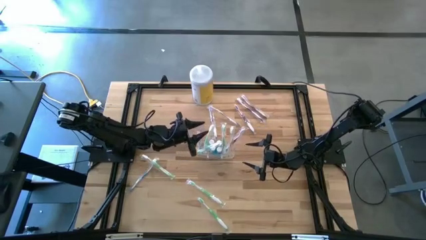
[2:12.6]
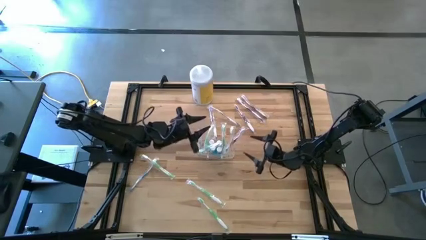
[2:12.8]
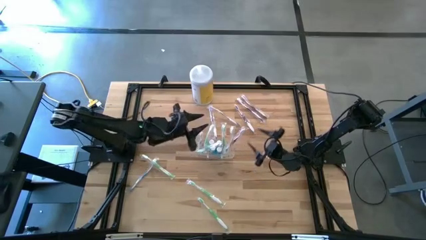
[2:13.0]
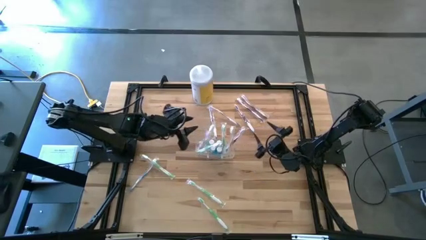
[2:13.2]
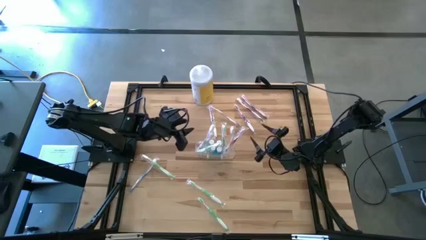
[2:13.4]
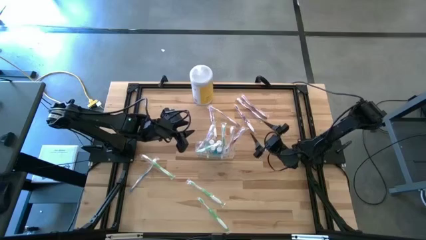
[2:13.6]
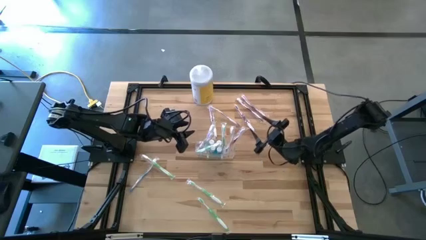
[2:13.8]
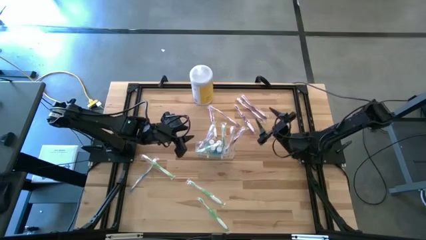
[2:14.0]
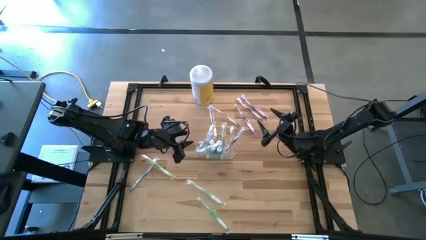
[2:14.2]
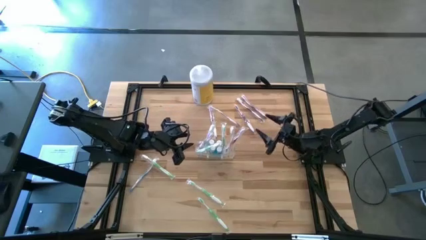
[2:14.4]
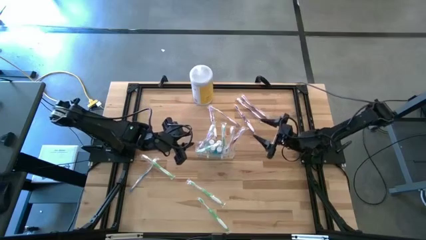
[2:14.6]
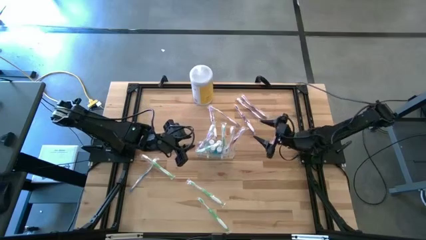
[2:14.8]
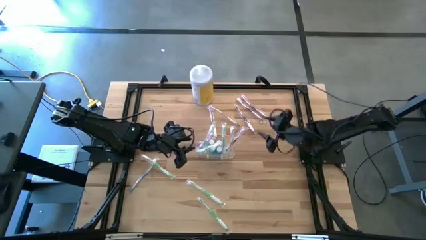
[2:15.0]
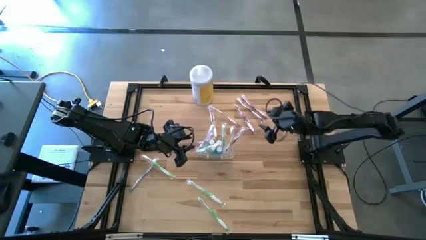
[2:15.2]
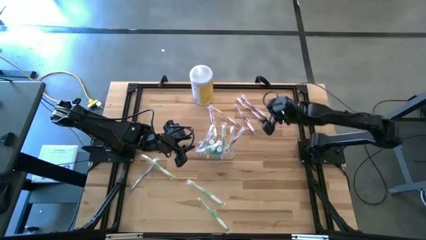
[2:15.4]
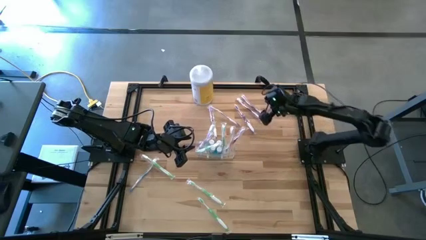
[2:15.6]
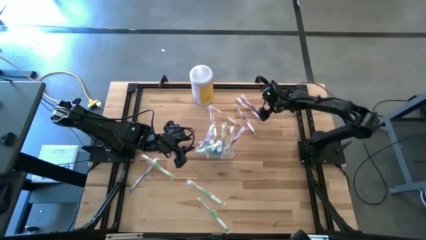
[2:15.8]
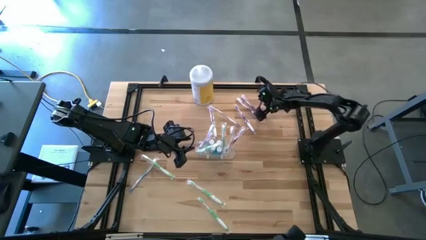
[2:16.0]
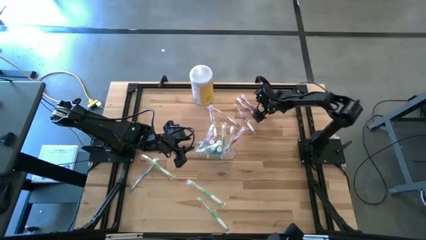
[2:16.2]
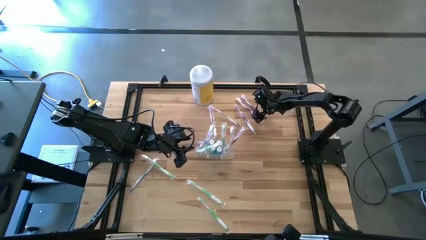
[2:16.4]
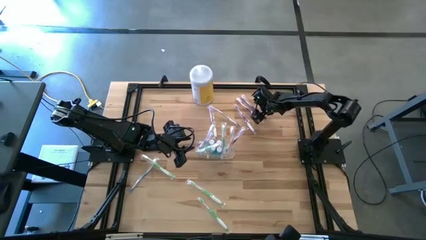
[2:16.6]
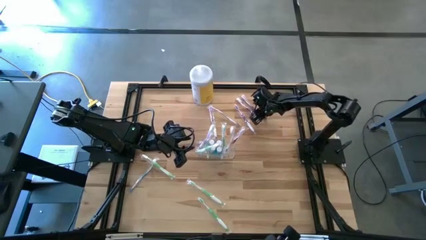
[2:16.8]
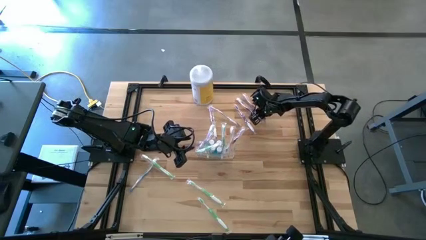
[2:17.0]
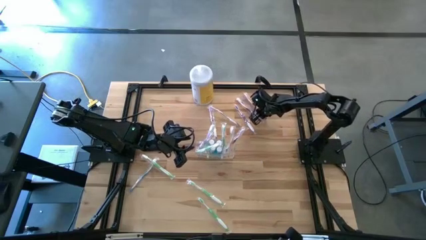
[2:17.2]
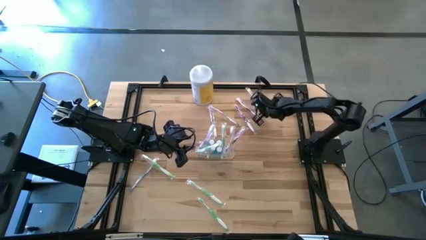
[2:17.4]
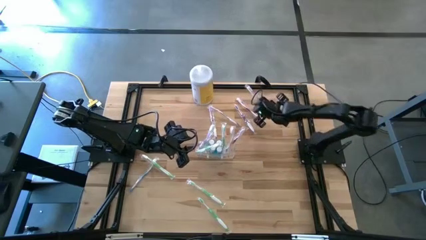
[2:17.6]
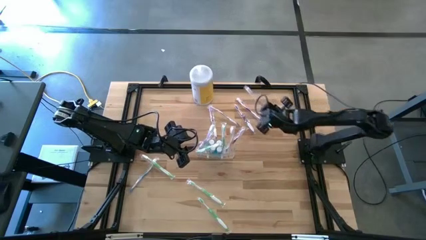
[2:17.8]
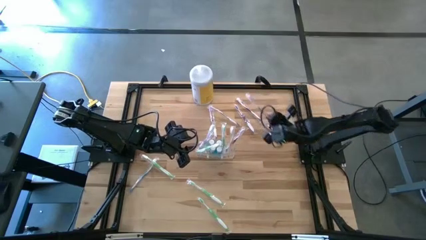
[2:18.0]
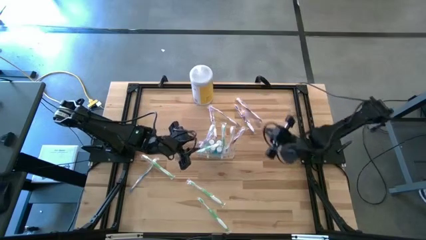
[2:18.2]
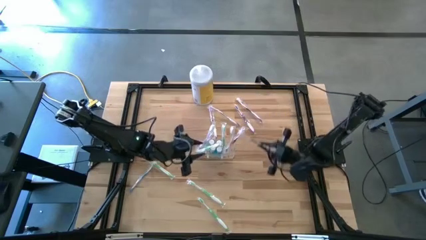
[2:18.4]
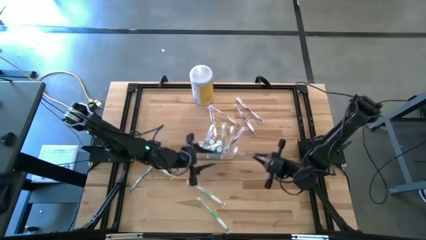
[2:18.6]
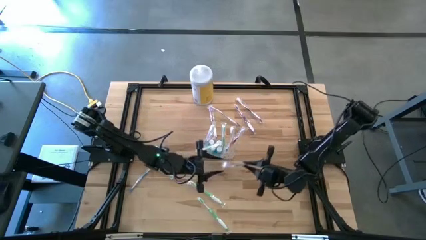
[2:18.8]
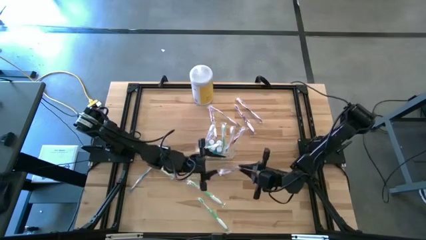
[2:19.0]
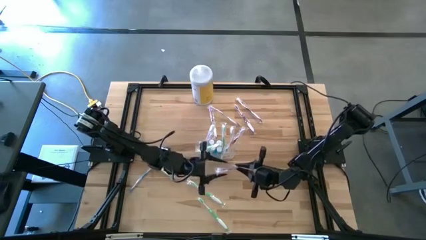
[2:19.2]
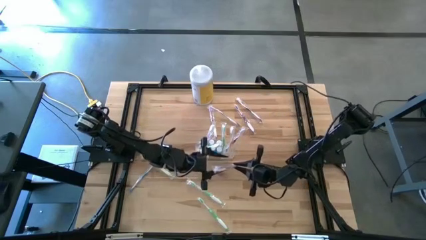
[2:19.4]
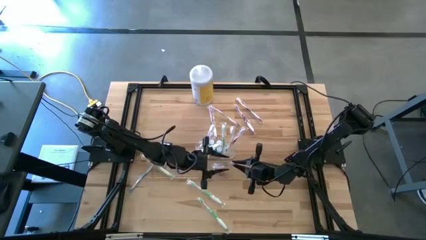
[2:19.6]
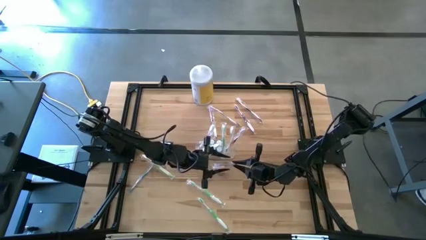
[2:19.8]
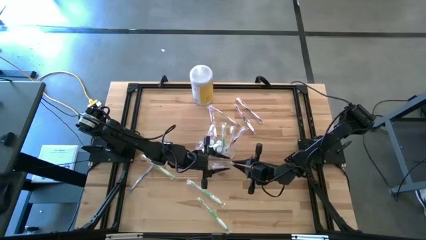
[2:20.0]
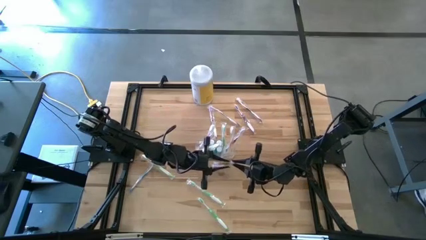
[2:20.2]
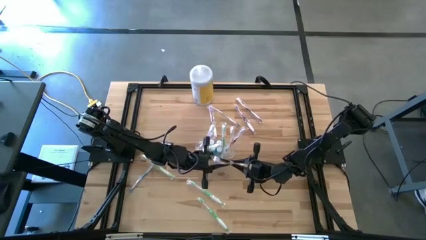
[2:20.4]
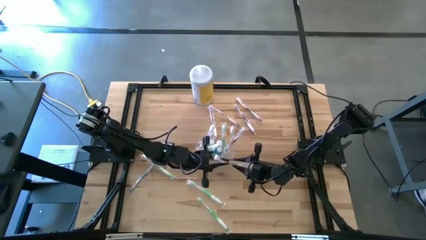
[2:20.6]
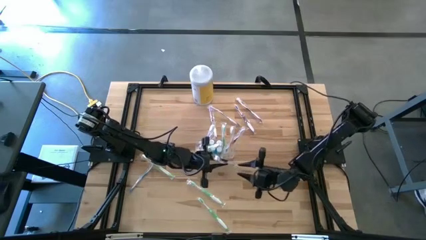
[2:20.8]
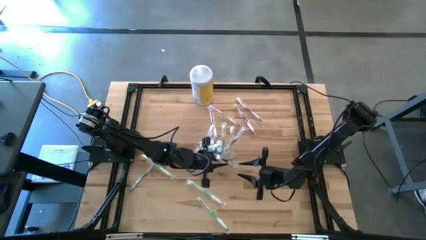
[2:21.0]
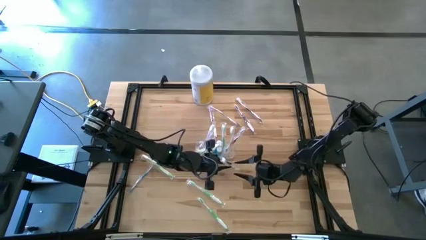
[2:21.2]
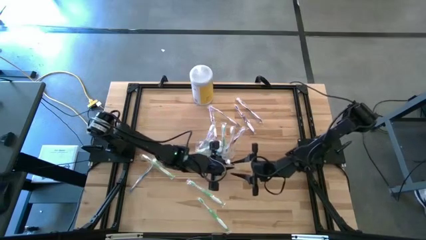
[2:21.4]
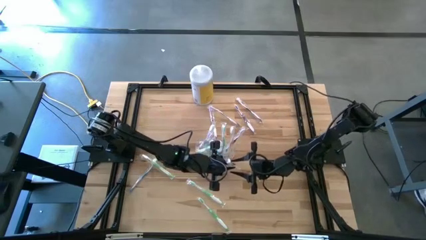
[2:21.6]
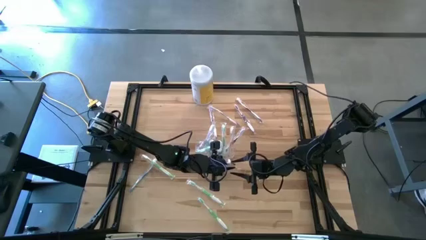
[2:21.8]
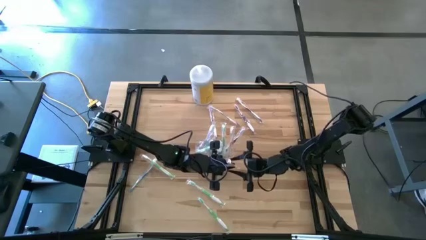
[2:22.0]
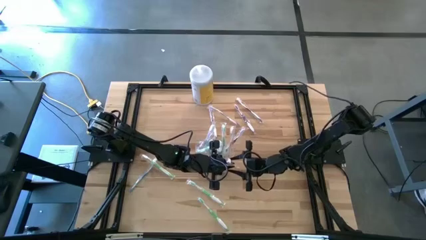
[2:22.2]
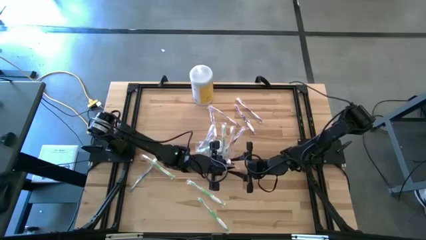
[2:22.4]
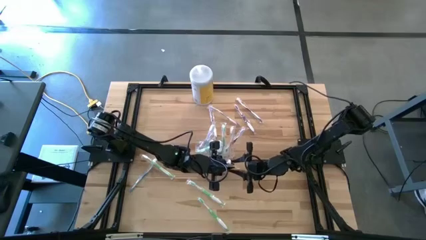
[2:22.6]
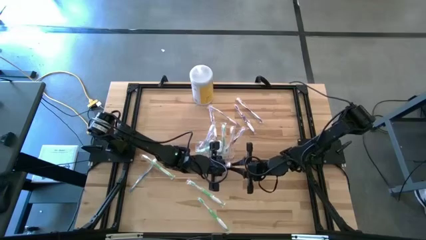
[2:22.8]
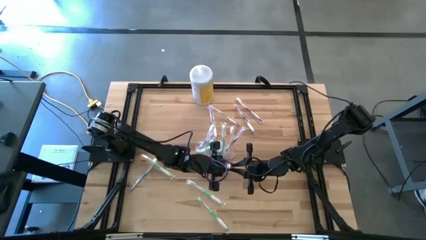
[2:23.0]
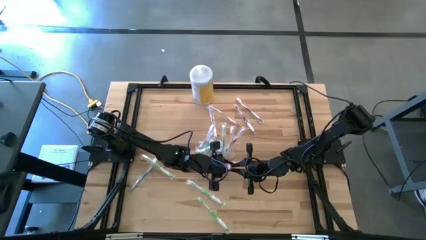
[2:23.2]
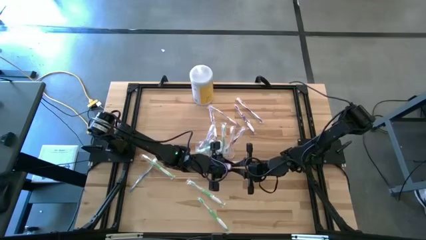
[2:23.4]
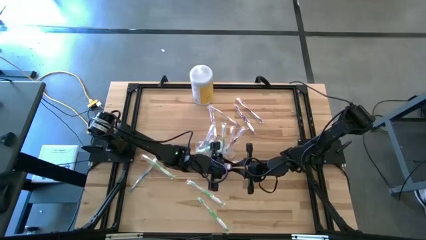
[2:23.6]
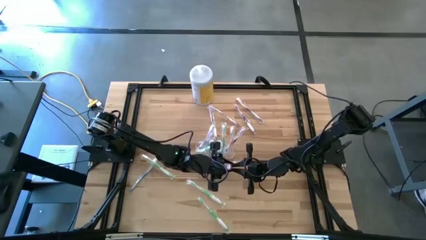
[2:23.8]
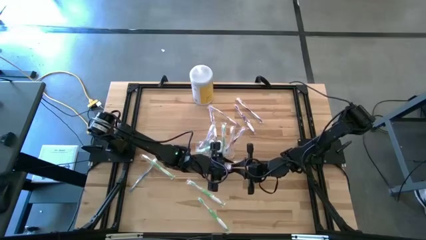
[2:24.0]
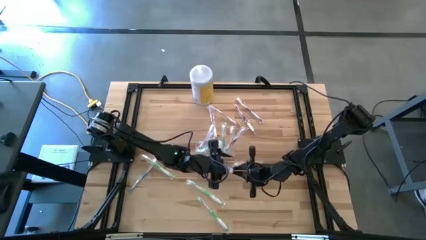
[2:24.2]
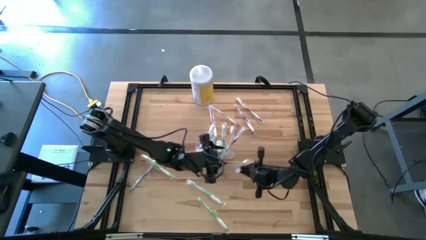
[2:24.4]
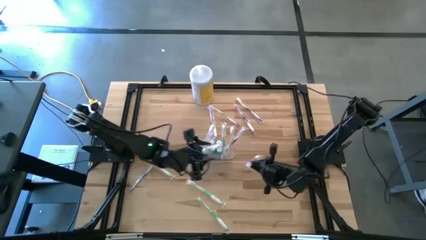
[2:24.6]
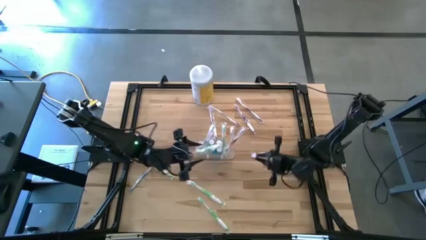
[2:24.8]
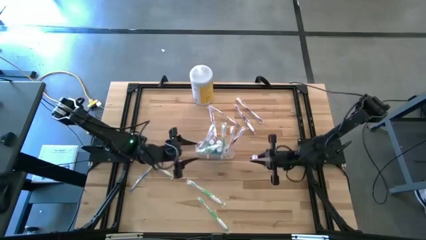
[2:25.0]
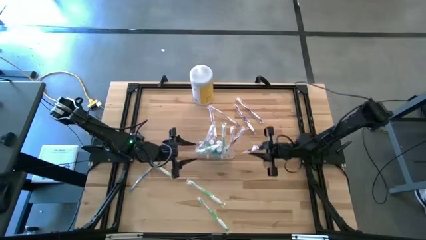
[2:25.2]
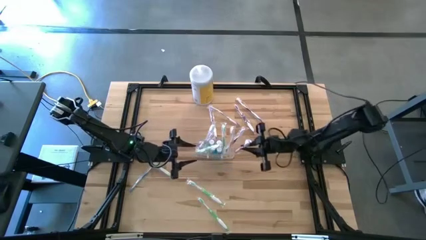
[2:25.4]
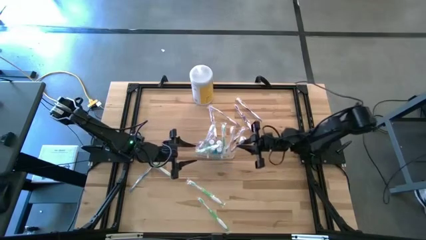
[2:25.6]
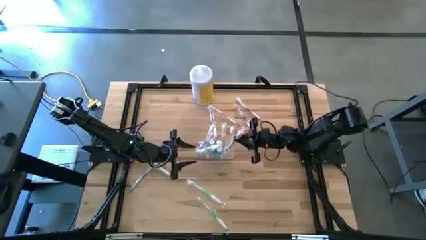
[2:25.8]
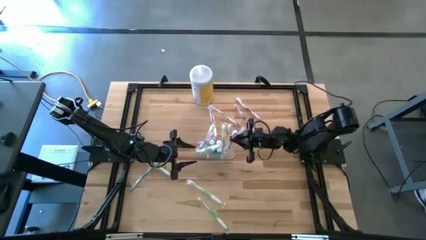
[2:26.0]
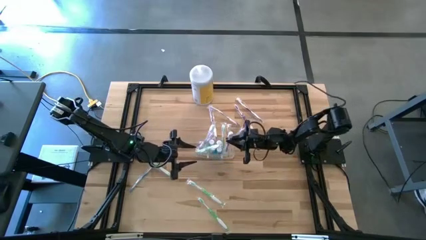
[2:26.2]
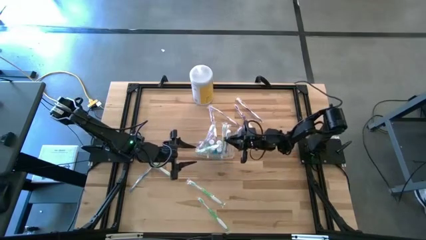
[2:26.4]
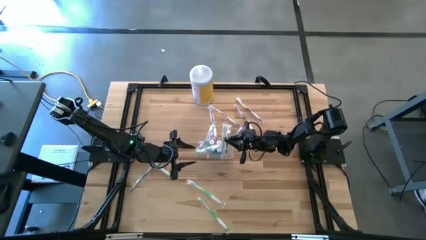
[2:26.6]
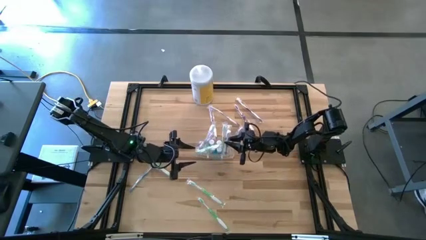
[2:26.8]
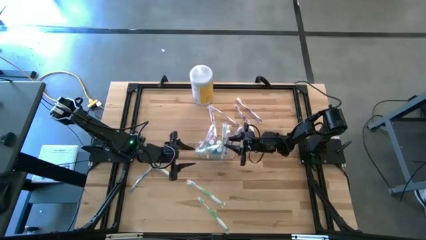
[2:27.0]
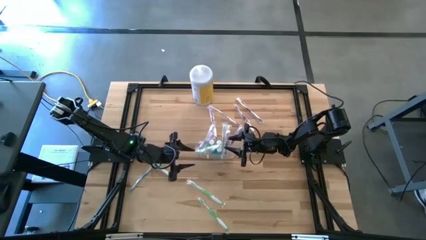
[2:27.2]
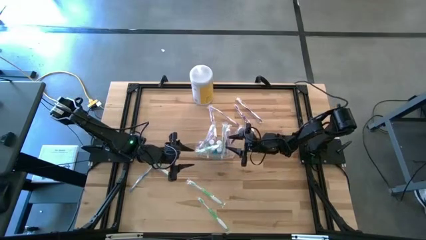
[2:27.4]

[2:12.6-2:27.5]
Task: Pick & Place toothbrushing station
Put the purple toothbrush into the transparent organizer

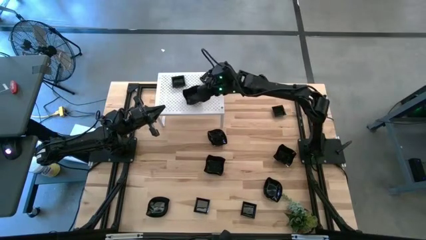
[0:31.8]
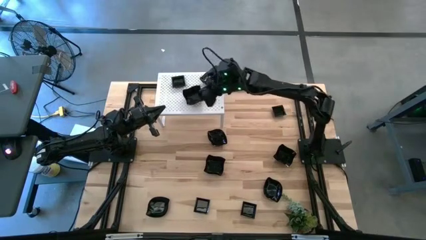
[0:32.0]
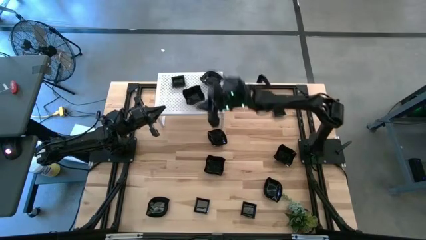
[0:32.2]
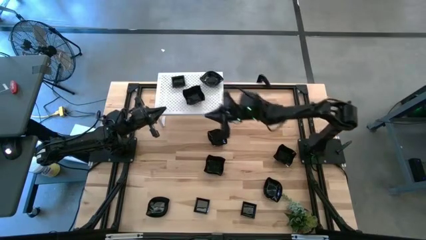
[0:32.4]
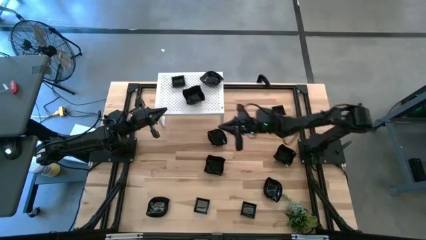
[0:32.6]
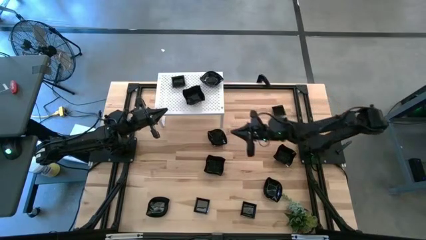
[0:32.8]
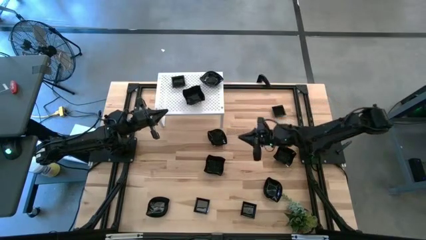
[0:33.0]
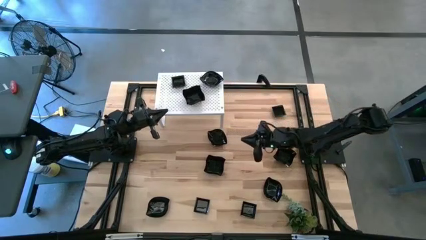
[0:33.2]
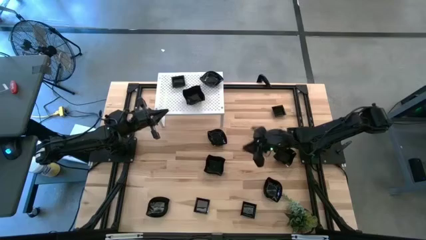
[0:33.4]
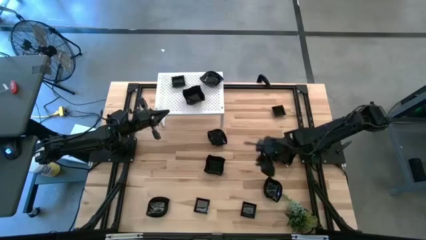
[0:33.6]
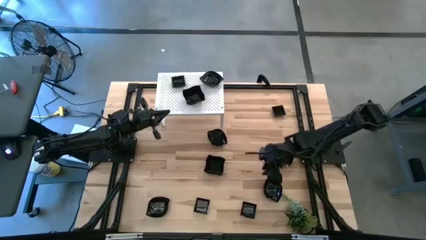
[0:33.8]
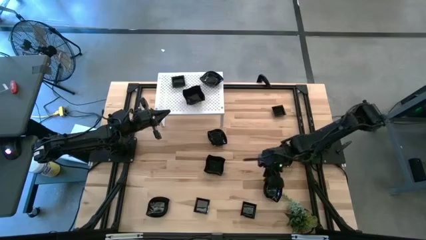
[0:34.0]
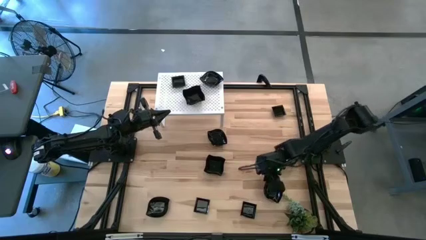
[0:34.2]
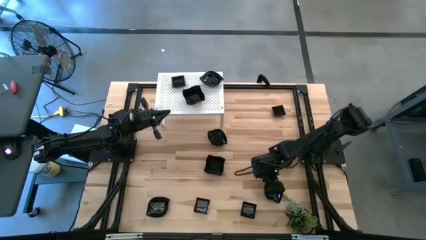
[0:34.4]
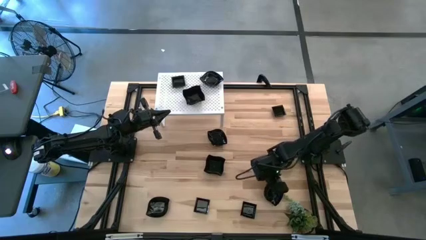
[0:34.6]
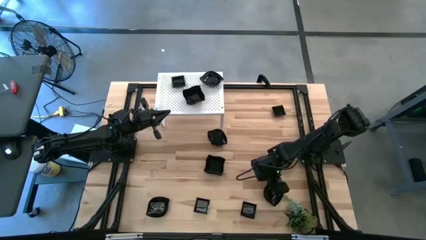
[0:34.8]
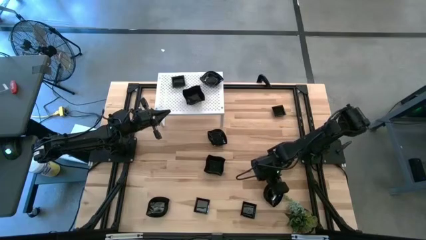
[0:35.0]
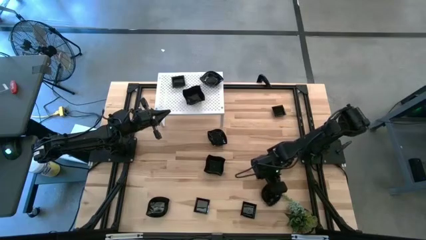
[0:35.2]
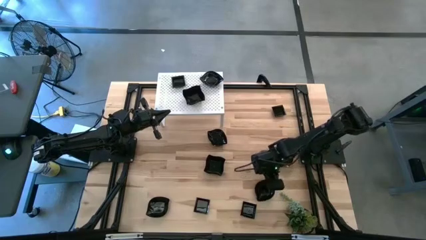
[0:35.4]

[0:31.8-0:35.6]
Task: Pick & Place Mini shaped plates
Stack the black leaf-shaped plate on top of the black leaf-shaped plate on the shelf
